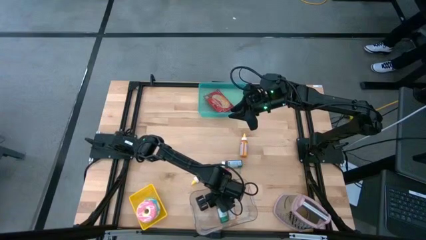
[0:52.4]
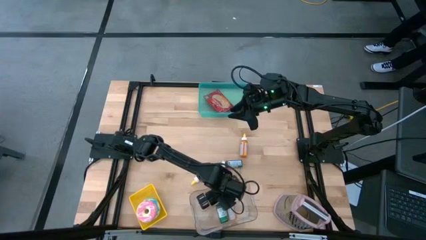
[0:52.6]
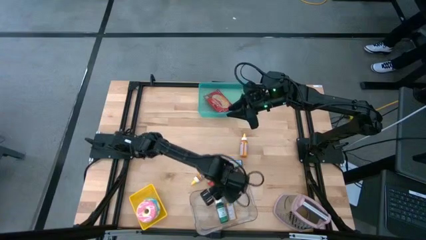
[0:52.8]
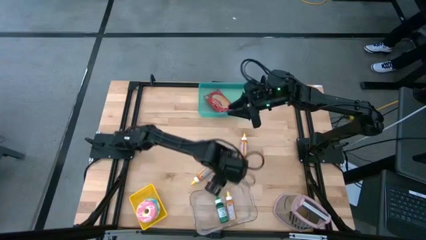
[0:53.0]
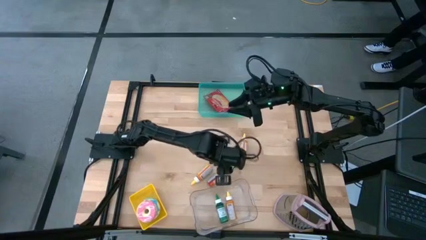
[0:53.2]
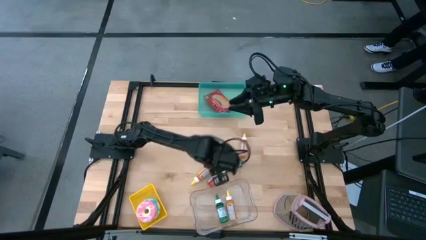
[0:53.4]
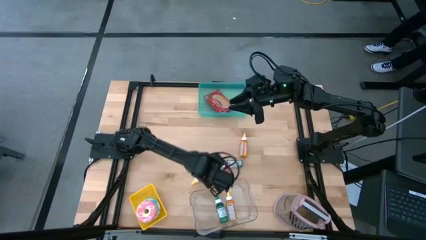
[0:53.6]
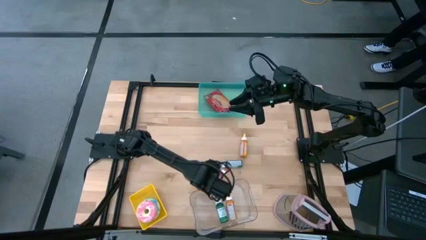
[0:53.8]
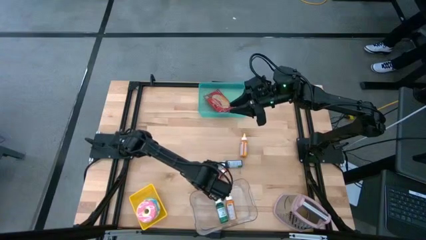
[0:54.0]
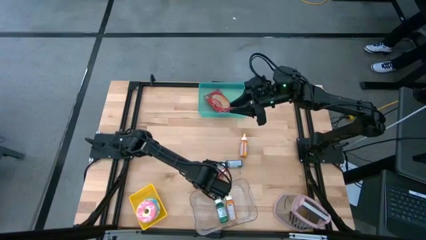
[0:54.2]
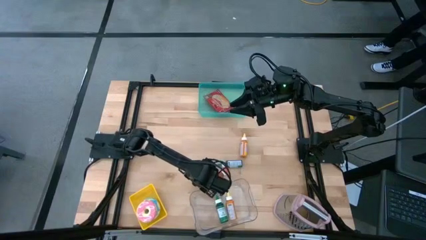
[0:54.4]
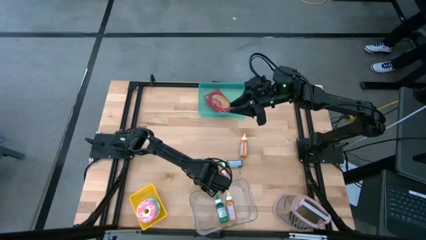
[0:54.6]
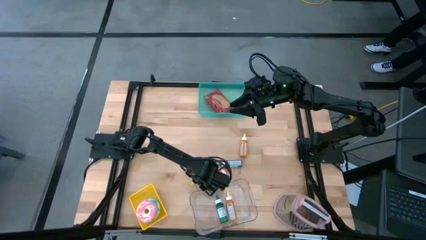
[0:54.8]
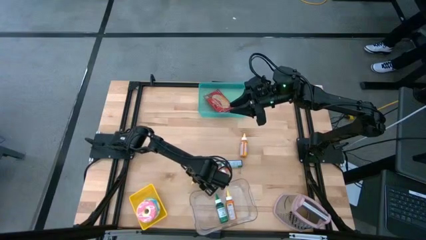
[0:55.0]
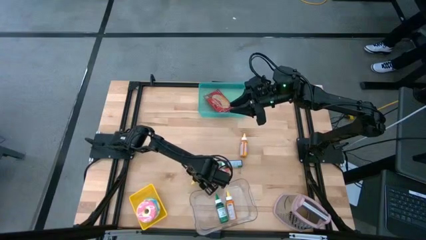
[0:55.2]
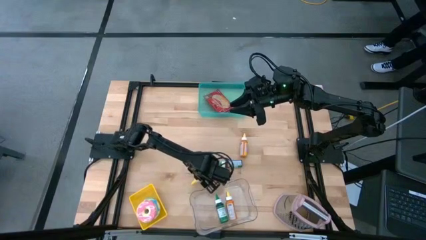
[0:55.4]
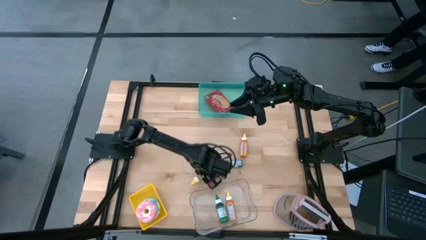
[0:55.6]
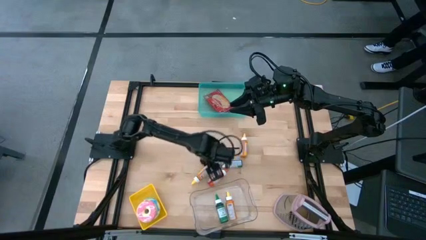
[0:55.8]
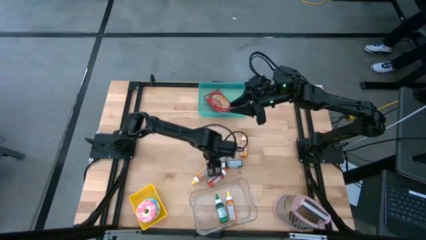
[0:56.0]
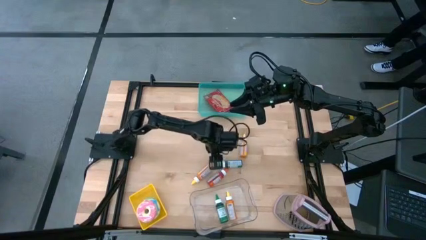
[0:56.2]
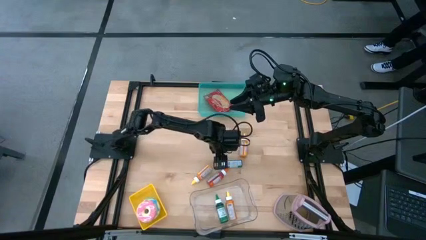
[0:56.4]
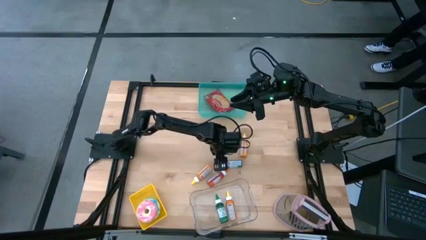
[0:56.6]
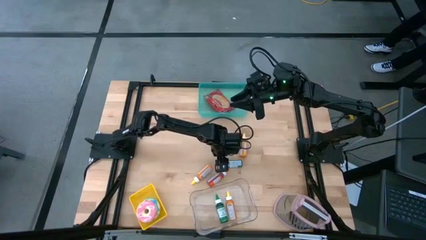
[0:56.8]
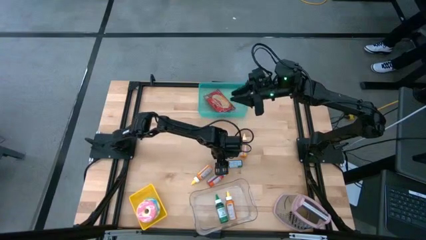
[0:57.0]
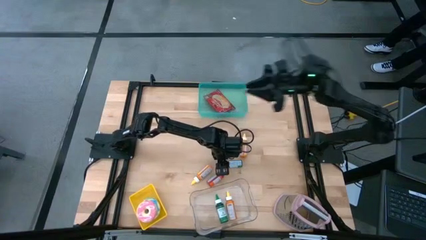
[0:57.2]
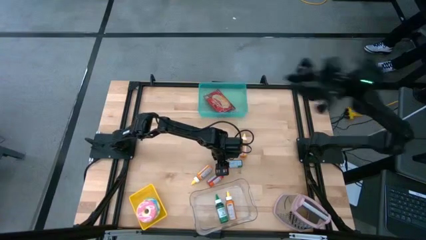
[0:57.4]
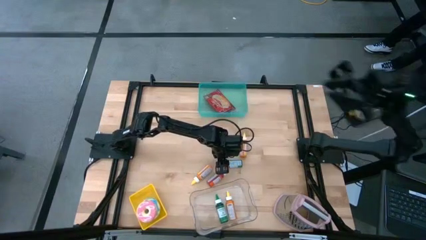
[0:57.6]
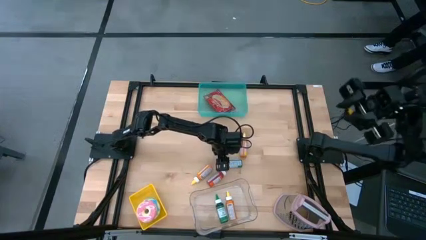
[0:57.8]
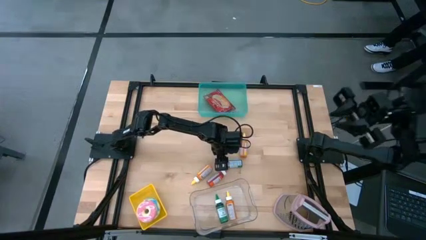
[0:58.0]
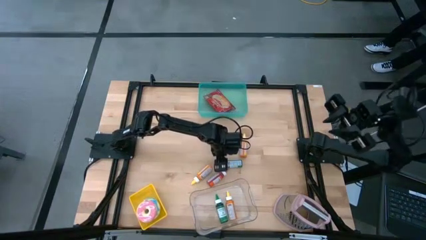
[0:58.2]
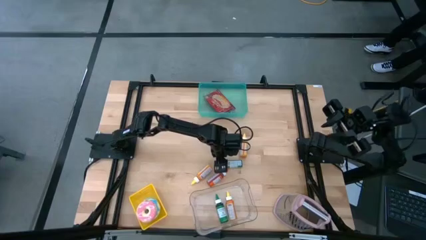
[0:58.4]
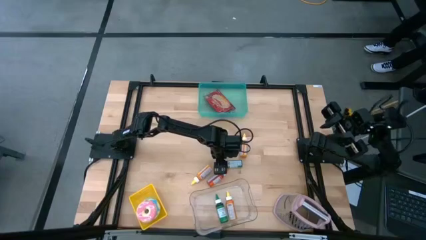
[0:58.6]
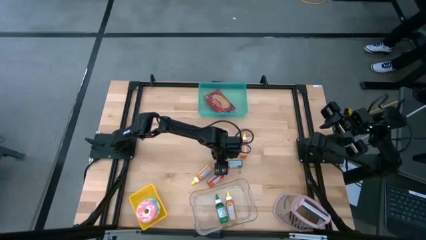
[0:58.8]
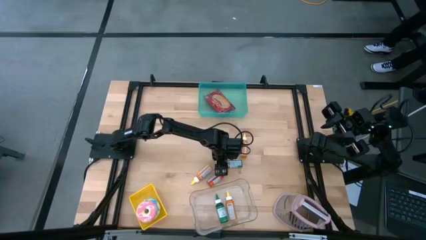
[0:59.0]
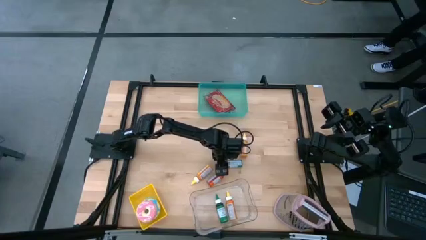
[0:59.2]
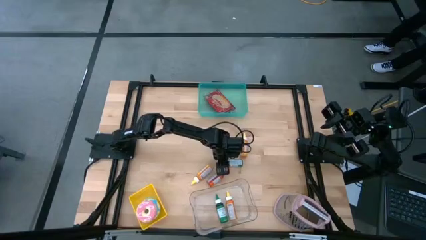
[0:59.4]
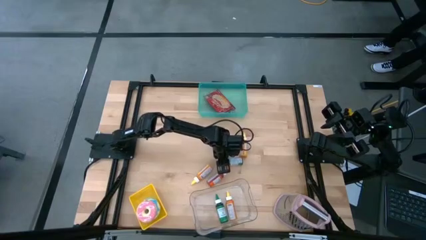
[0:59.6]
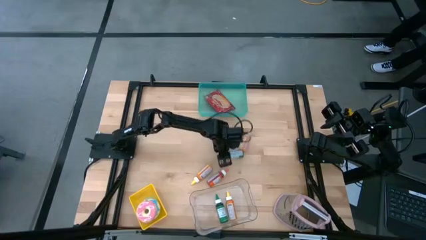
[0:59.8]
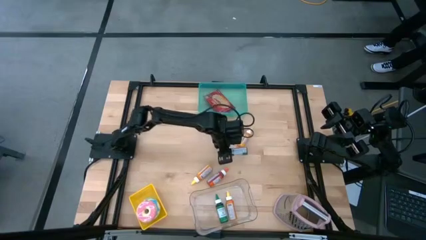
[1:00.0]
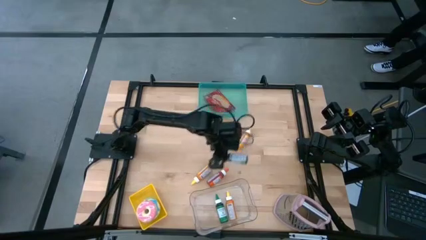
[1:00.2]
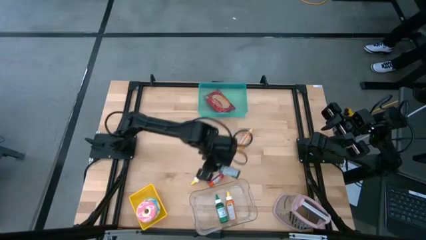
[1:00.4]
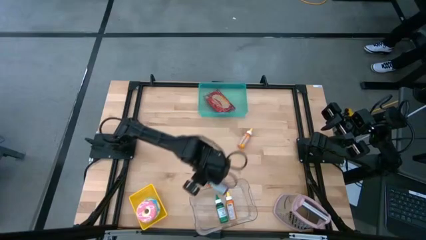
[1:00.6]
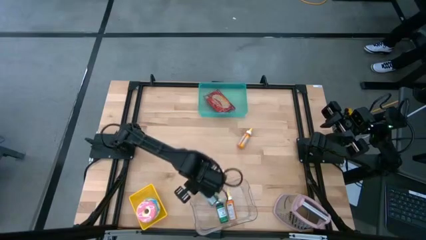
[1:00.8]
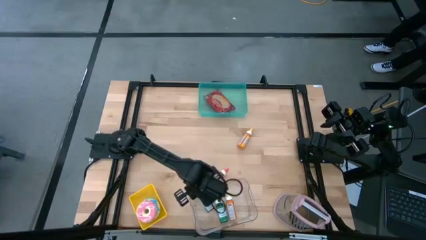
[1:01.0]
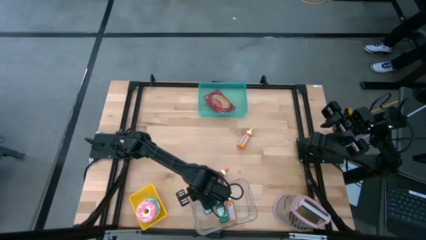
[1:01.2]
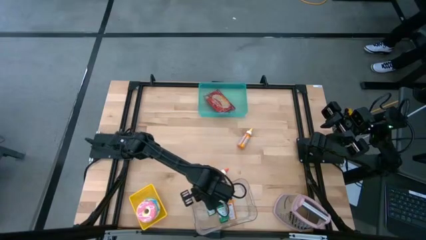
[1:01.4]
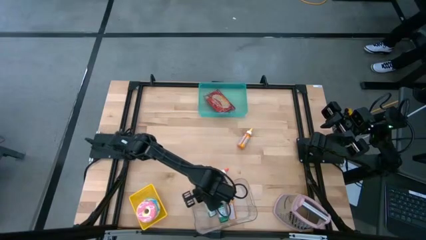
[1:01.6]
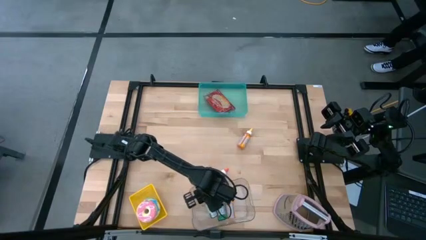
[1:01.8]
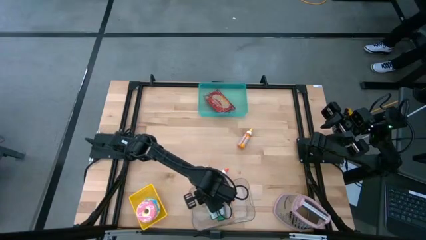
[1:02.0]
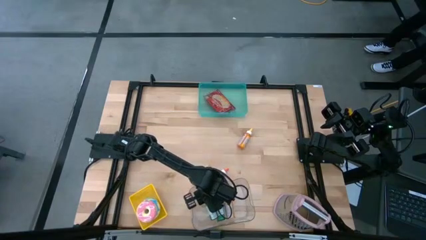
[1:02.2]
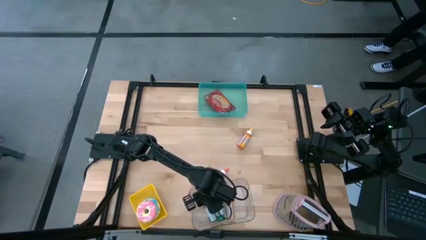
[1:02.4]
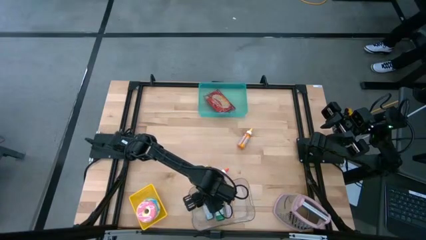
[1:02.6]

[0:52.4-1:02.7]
Put the green food coloring bottle into the transparent bin

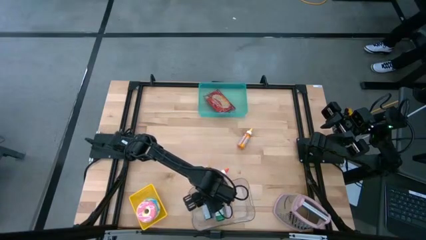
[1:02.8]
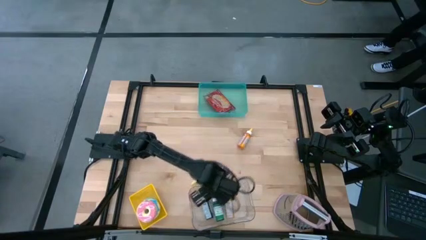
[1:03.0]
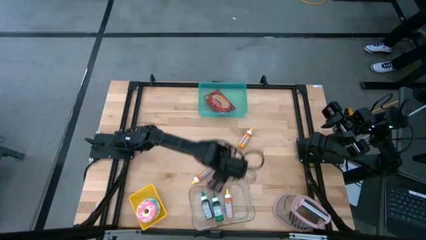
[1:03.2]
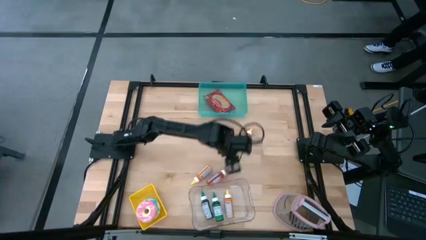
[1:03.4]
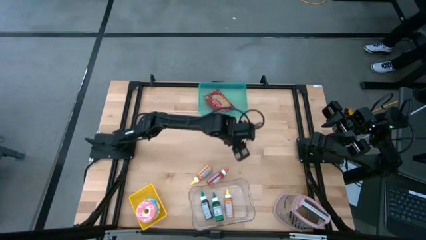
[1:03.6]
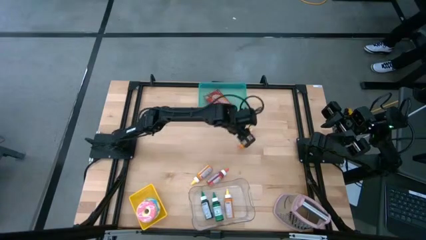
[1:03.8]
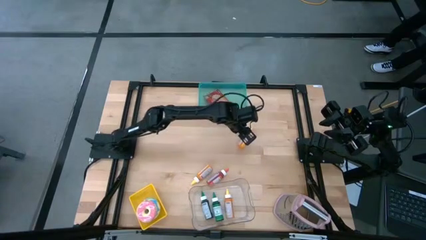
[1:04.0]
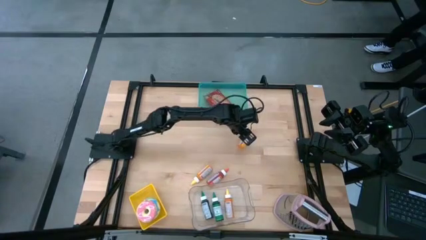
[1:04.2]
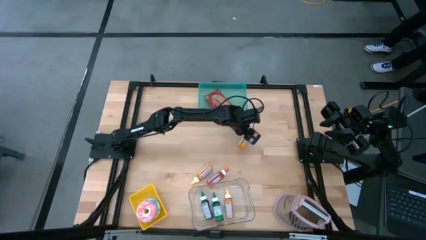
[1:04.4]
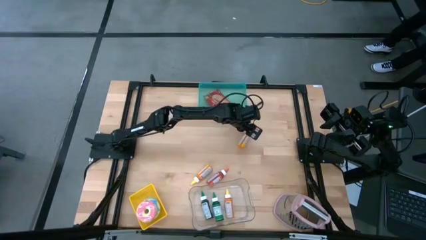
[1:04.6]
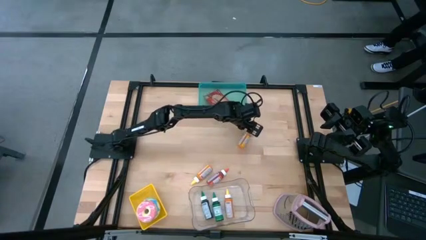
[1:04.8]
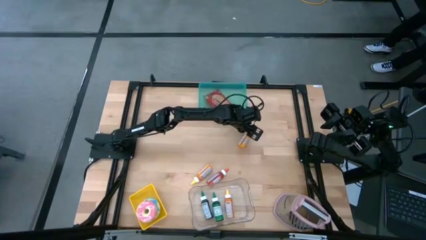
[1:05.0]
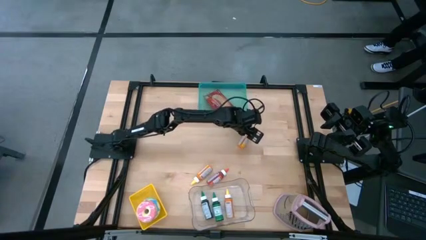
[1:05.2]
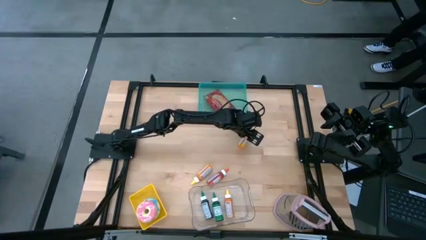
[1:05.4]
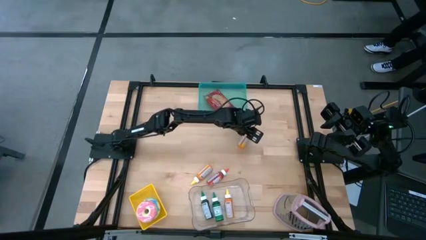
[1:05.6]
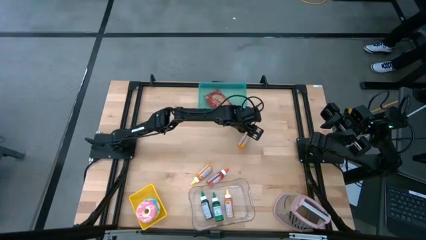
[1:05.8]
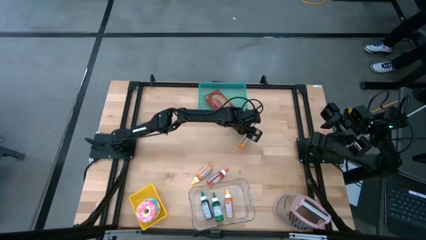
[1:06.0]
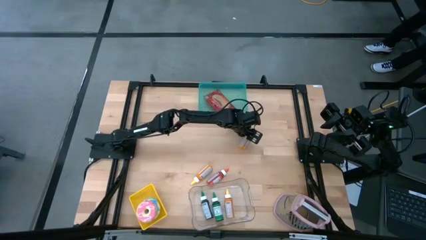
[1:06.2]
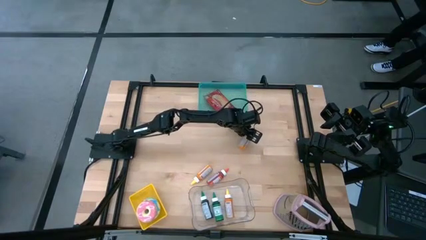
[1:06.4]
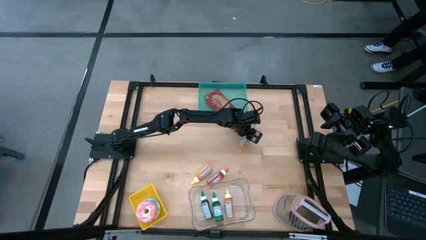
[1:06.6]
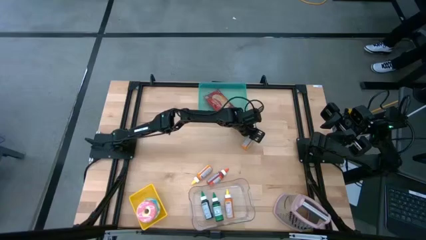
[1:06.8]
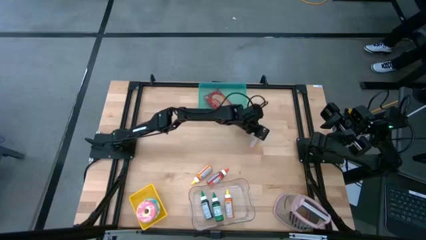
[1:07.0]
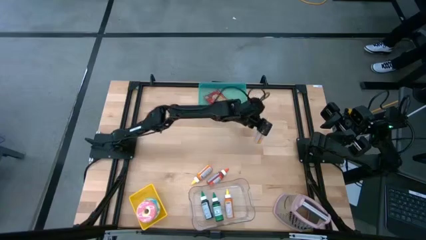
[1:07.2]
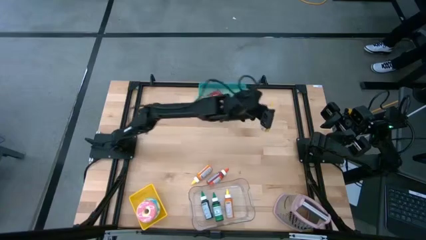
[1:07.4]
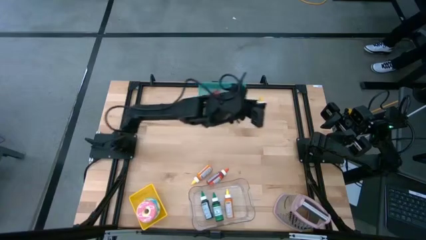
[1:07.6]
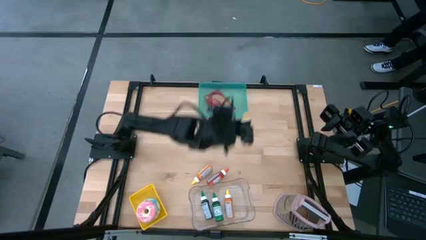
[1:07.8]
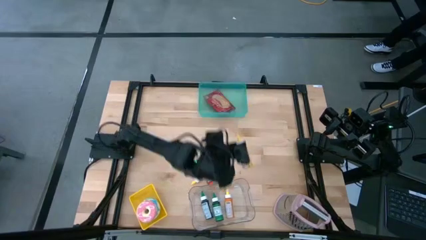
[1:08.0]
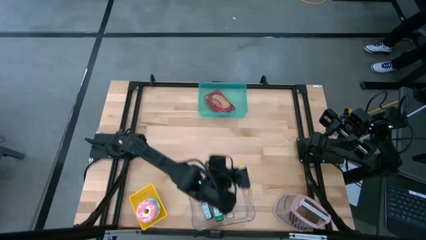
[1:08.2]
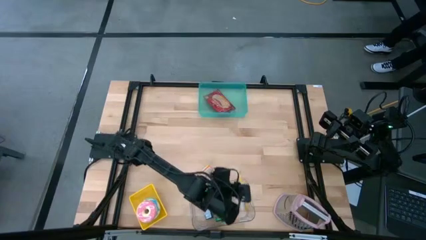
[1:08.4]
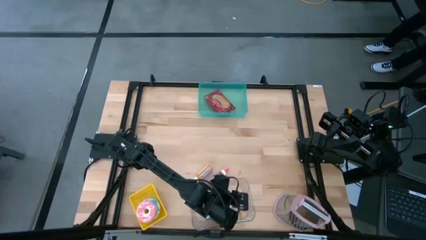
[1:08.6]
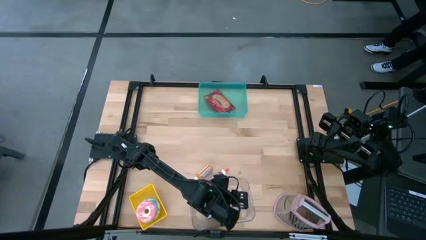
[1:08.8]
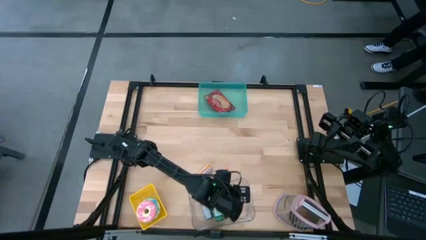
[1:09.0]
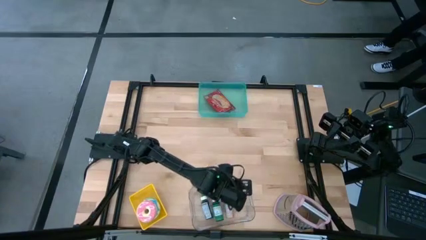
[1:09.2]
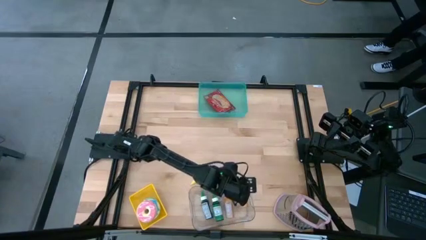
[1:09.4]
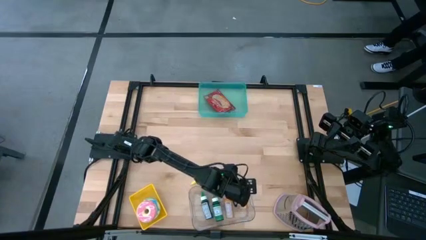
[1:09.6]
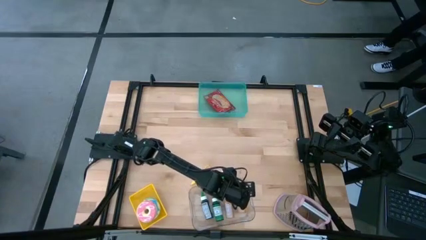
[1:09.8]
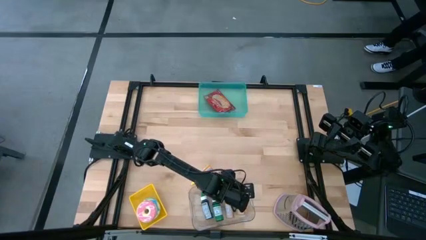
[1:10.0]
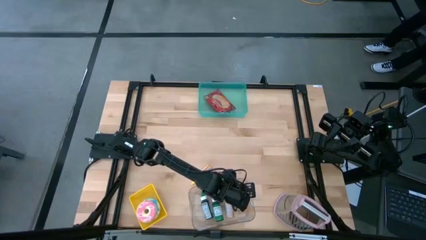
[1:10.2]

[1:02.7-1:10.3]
Put the top yellow food coloring bottle into the transparent bin
